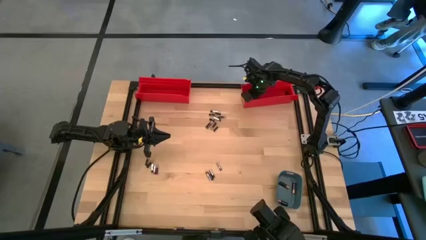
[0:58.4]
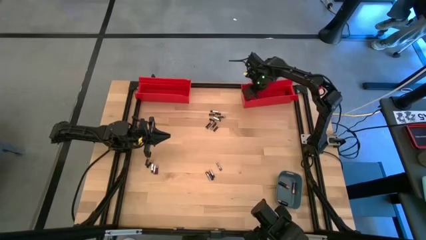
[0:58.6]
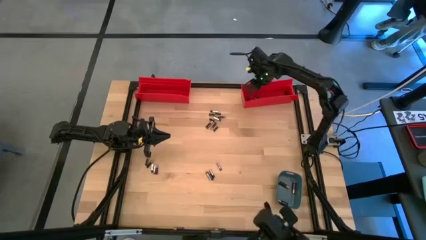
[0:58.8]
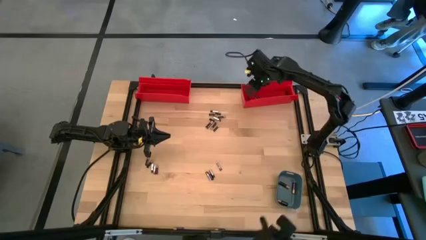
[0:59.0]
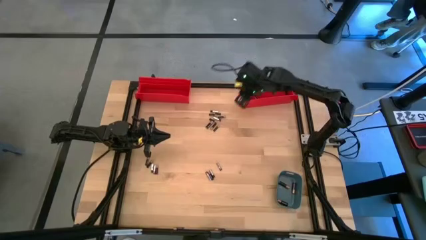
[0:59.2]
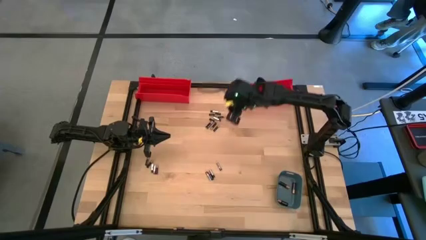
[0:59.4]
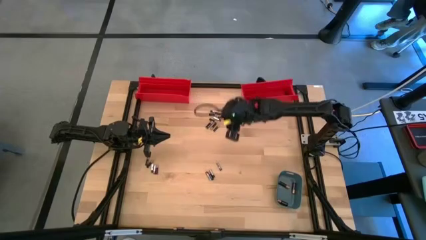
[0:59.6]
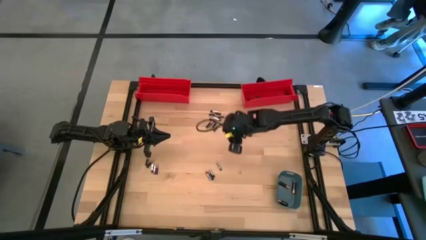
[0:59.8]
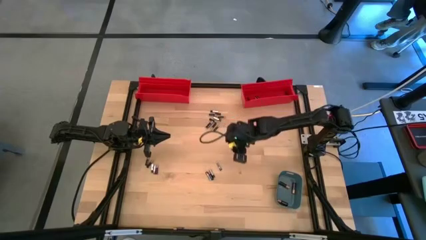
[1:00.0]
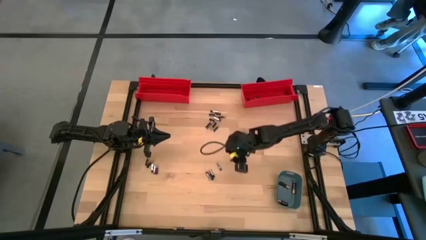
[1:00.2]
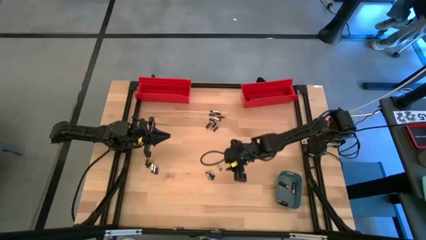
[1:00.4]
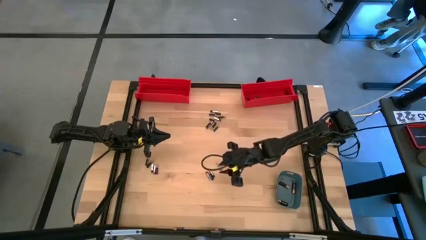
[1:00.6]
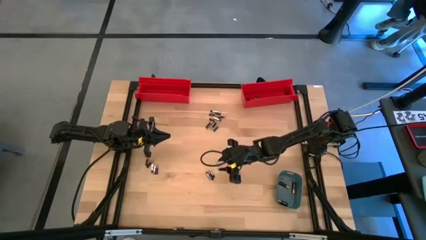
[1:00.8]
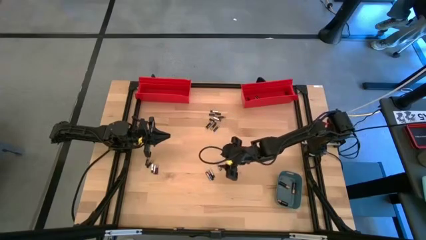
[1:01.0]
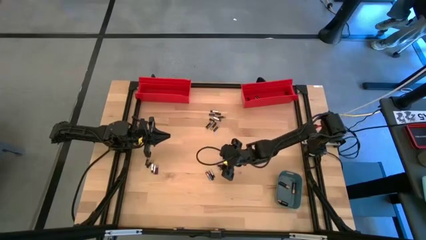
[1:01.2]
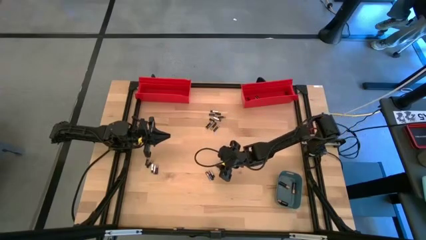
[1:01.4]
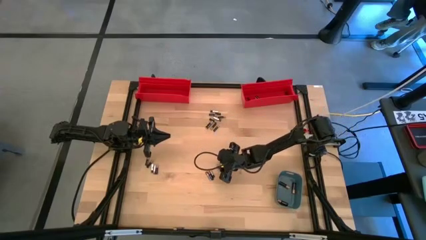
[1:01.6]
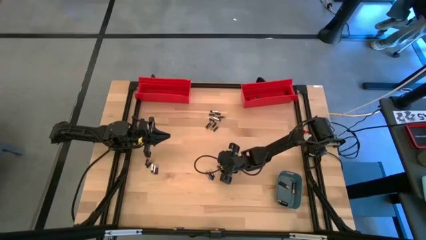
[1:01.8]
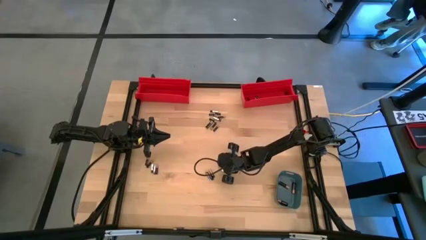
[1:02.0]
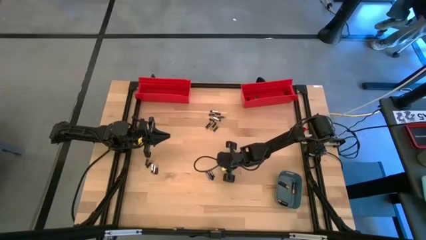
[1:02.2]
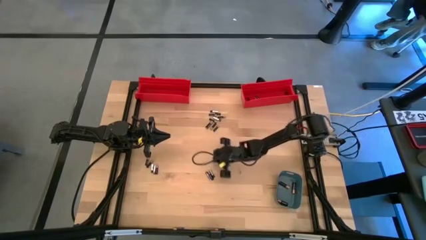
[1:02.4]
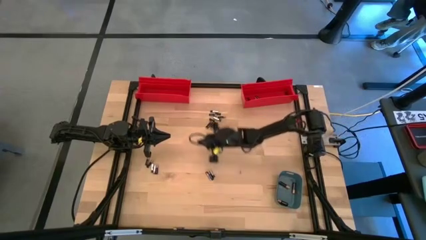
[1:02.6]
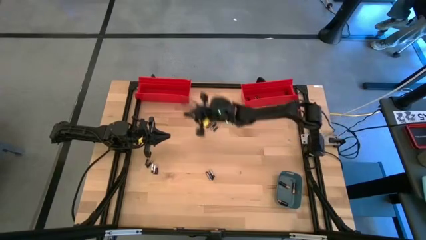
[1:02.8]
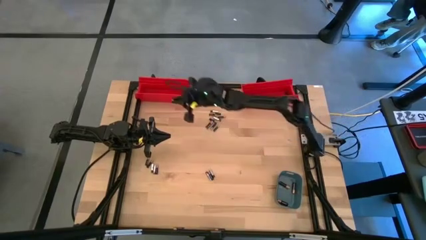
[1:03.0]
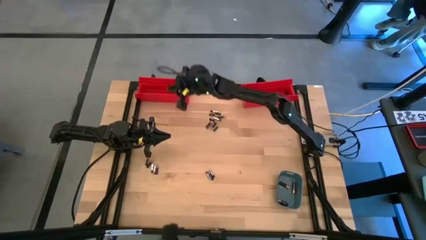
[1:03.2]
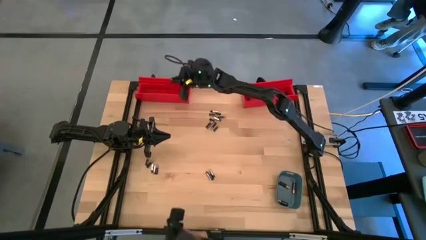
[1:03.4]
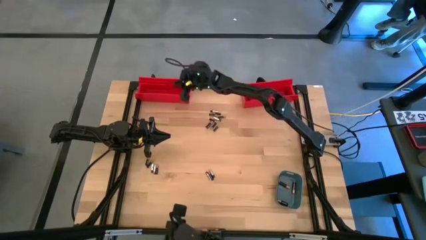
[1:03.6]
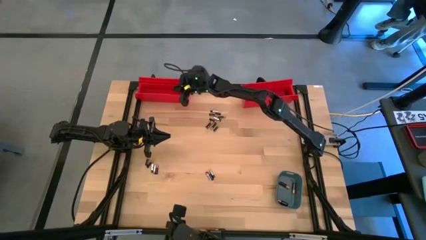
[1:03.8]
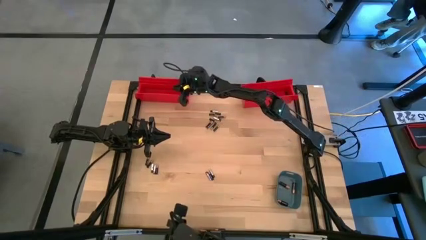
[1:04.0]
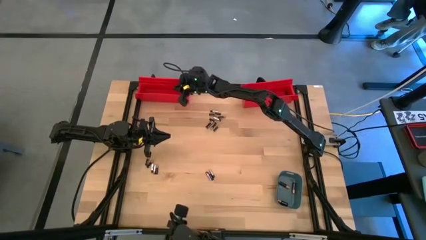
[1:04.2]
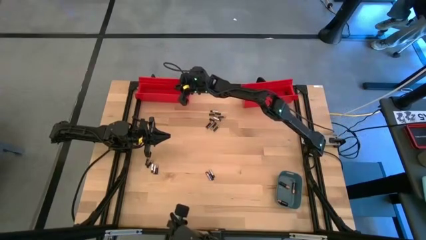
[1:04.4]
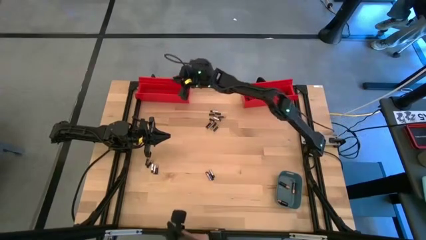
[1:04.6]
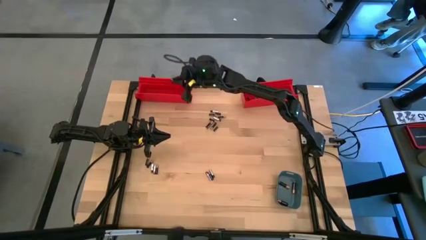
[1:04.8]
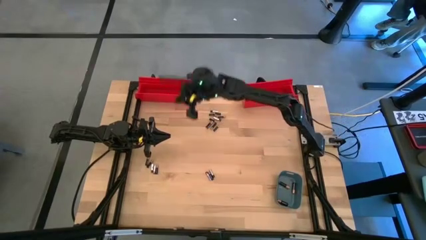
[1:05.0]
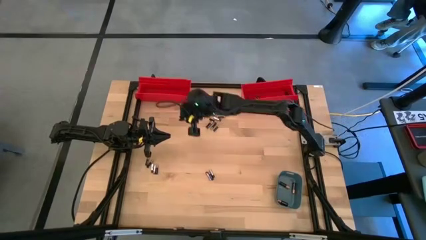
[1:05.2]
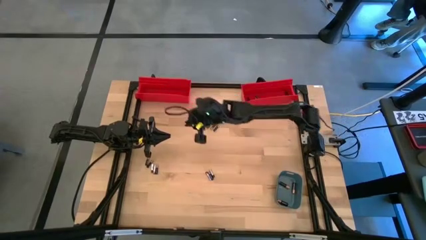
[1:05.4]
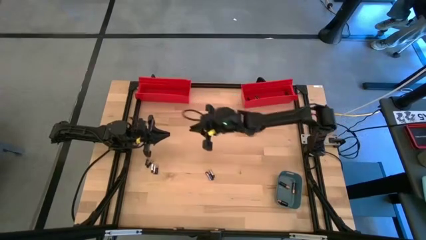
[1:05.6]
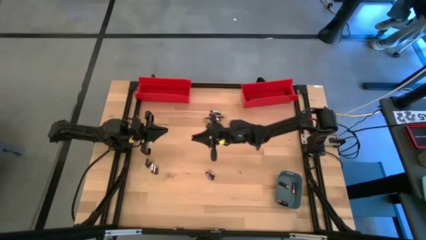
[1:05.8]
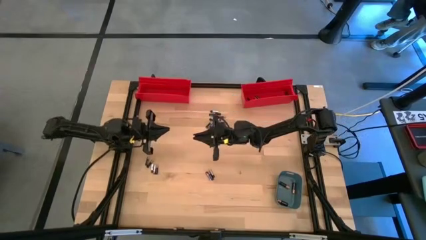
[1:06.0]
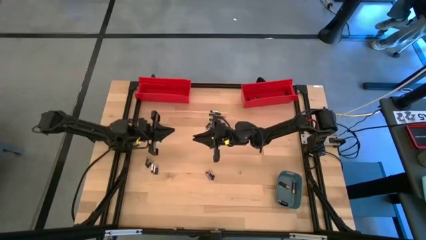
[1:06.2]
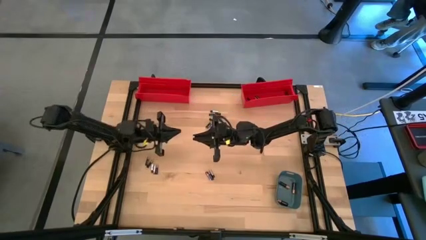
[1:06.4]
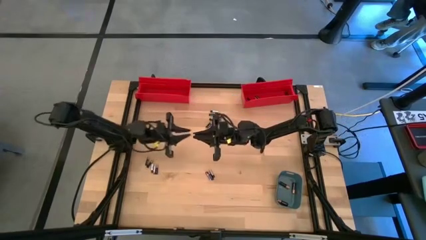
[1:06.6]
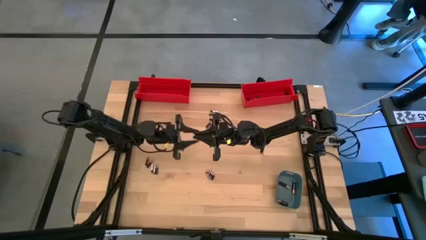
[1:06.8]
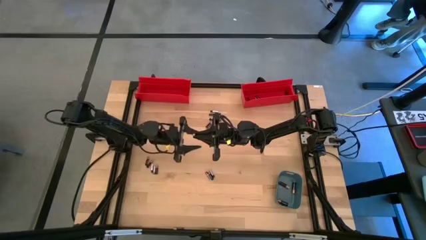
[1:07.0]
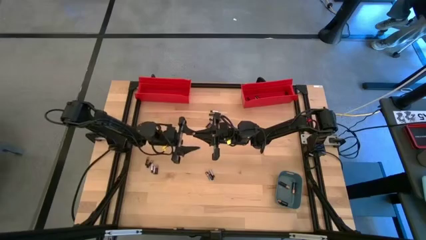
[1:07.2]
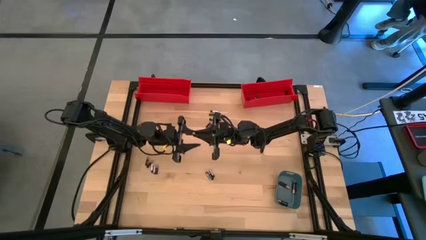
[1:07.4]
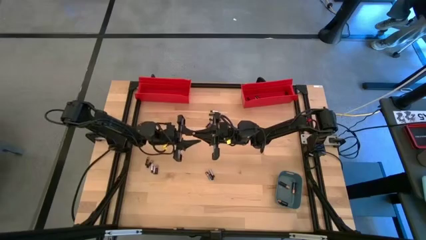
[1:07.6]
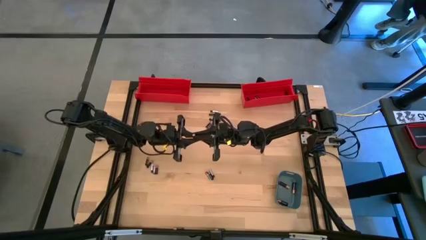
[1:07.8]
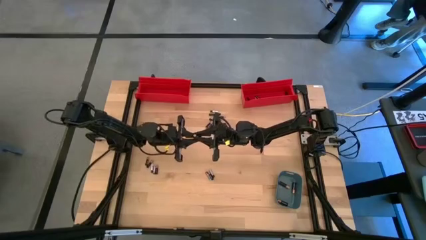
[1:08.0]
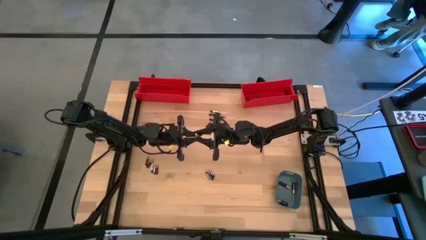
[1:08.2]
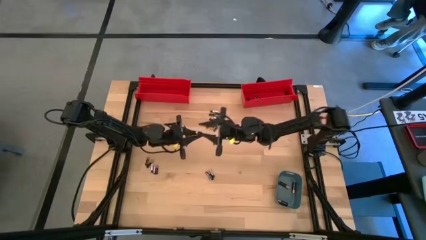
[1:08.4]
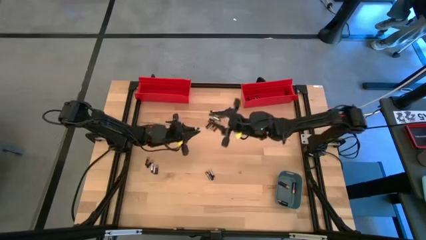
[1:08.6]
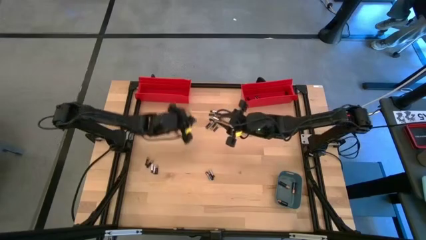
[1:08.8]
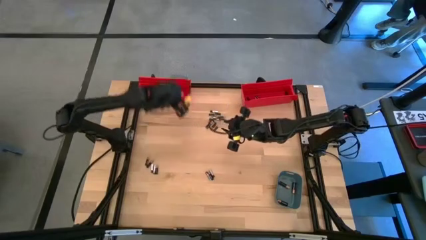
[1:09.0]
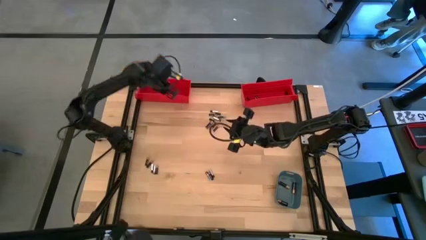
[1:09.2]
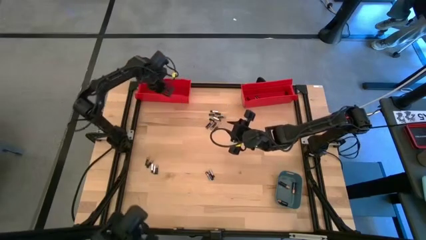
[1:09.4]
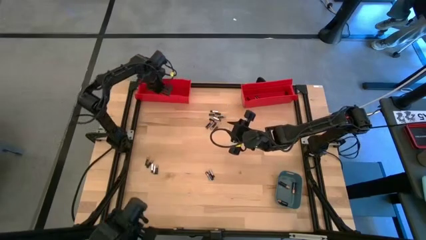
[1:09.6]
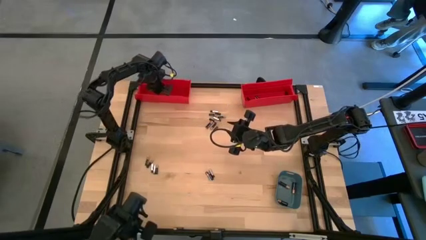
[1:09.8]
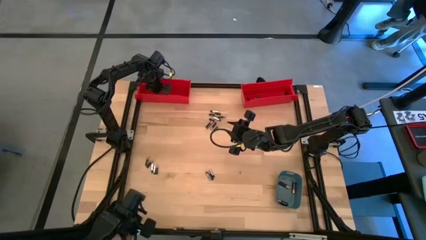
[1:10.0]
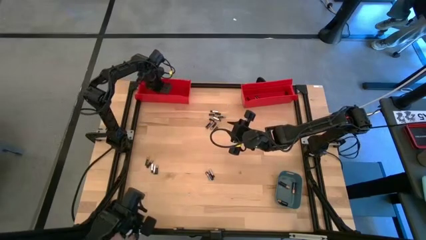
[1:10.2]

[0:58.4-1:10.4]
Task: Sort batteries
Put the small silver battery into the left red bin

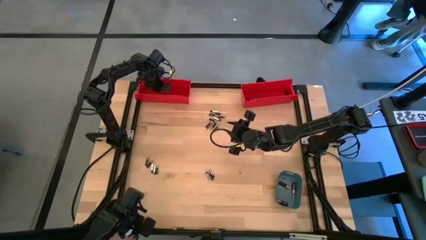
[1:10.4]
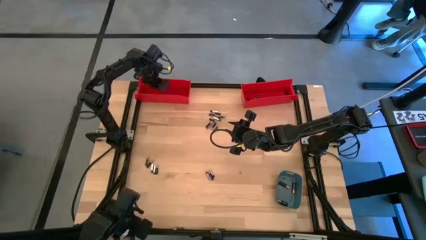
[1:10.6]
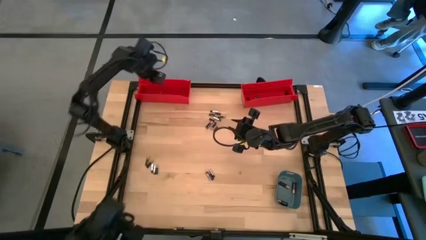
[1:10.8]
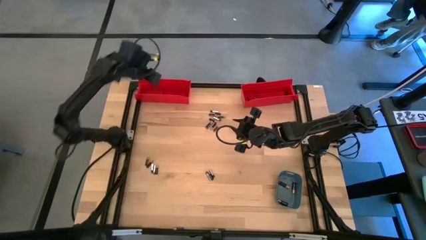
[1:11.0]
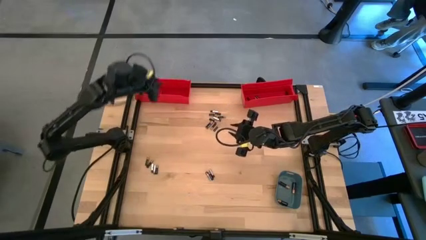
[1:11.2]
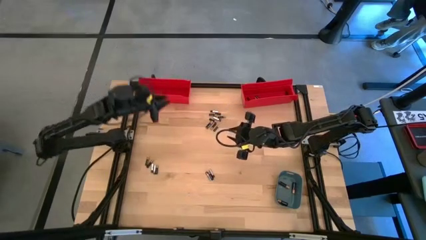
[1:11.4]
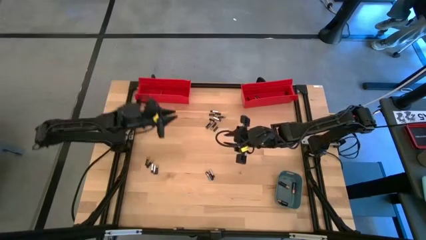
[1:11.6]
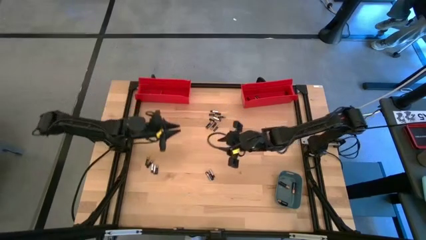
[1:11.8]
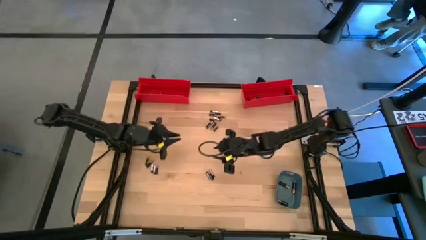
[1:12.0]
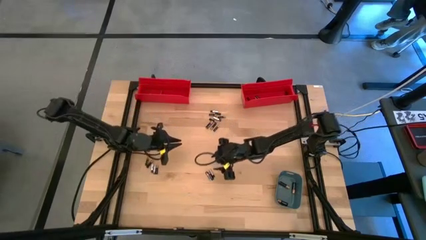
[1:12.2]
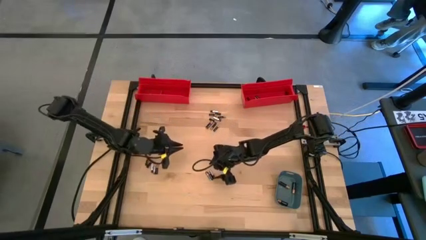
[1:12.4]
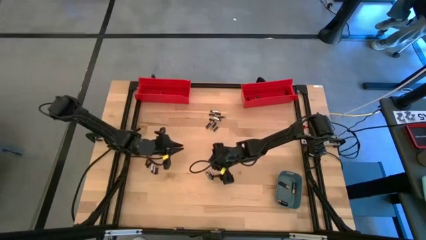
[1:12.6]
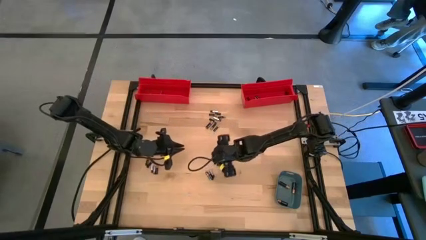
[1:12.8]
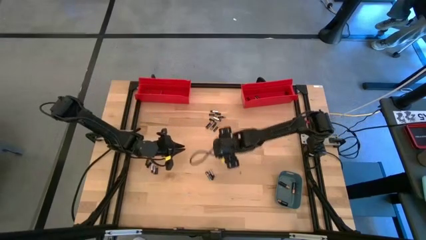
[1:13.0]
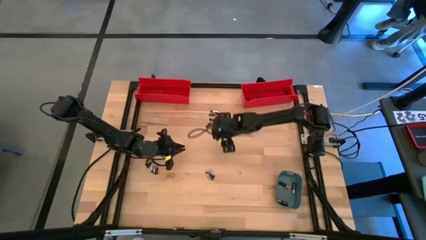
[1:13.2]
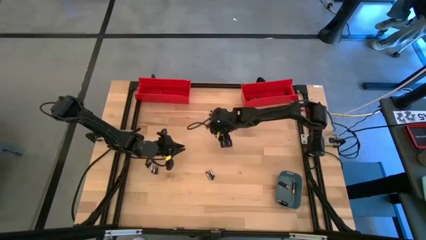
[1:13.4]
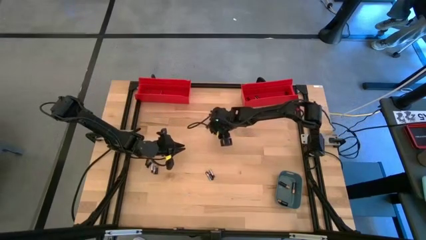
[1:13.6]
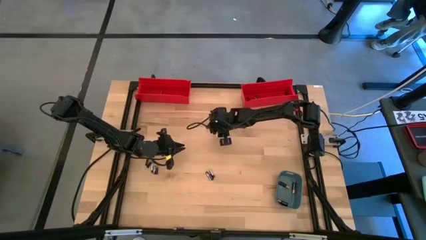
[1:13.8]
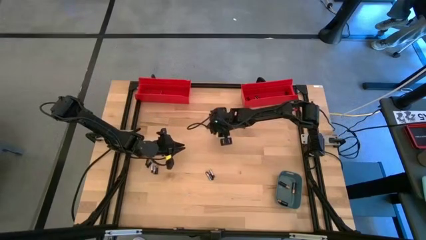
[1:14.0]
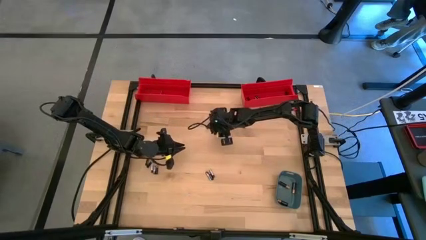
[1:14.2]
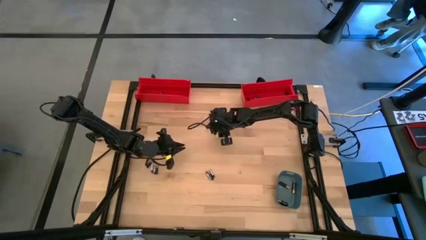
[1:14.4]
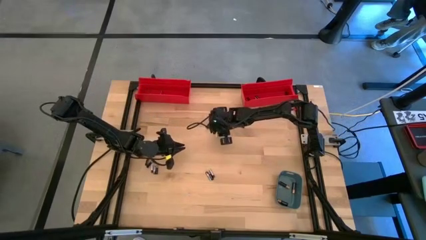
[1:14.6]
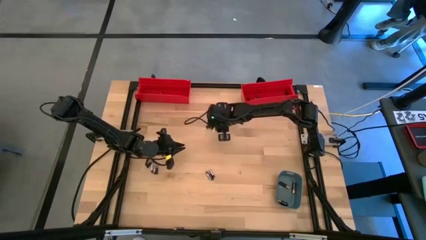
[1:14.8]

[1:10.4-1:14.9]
Put the small silver battery into the left red bin
